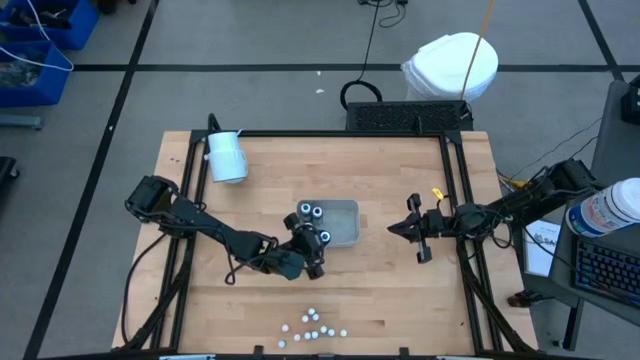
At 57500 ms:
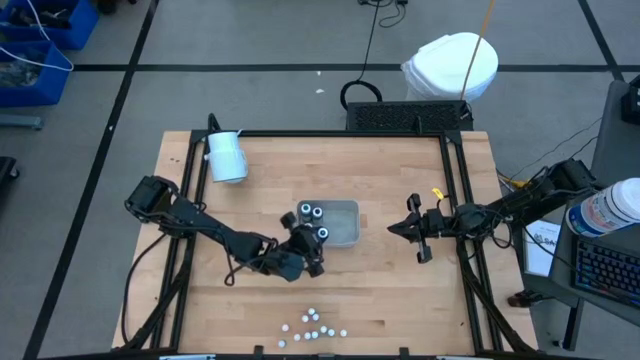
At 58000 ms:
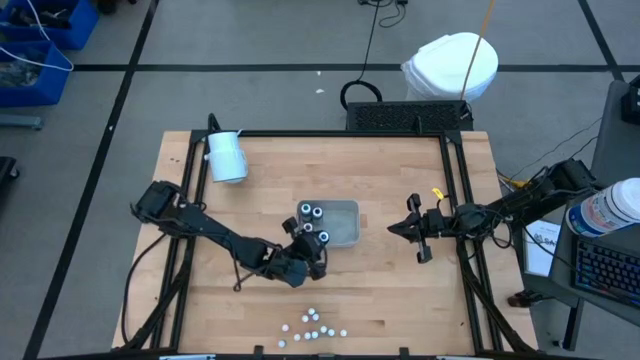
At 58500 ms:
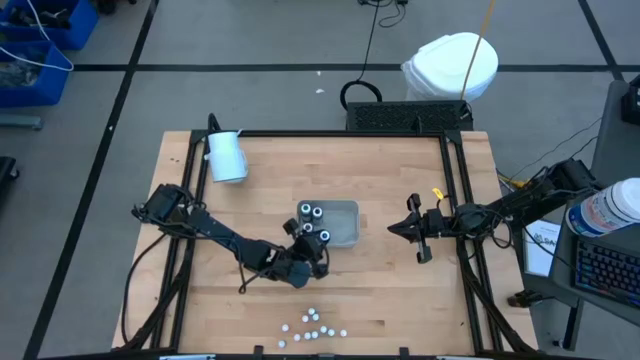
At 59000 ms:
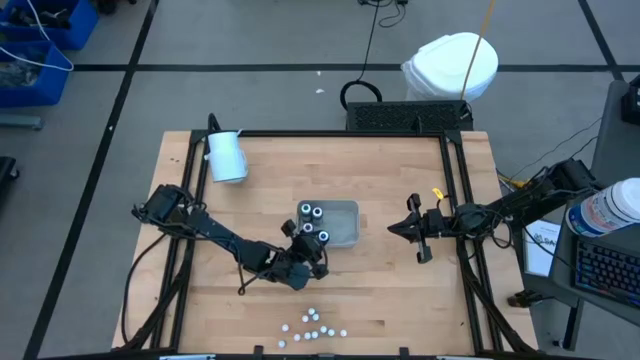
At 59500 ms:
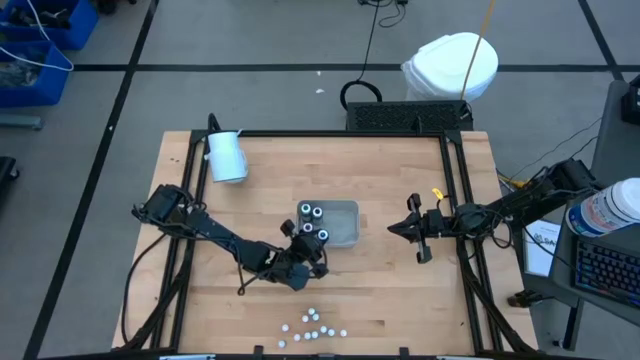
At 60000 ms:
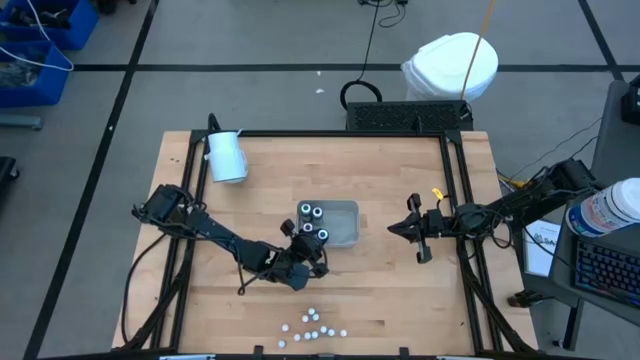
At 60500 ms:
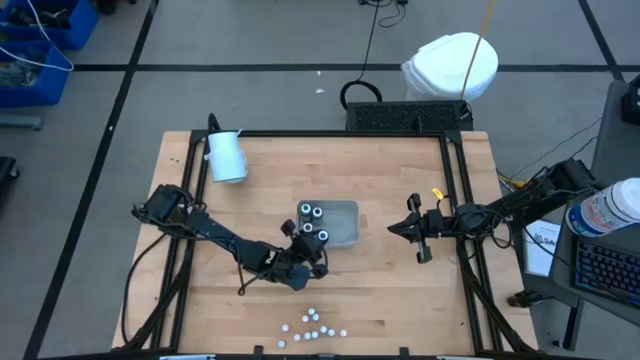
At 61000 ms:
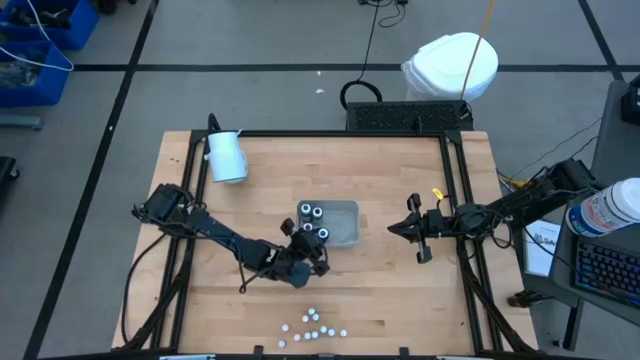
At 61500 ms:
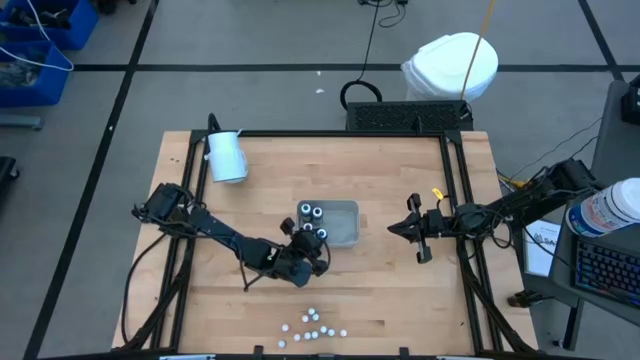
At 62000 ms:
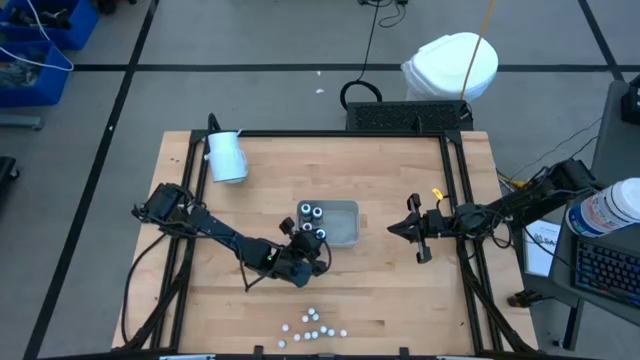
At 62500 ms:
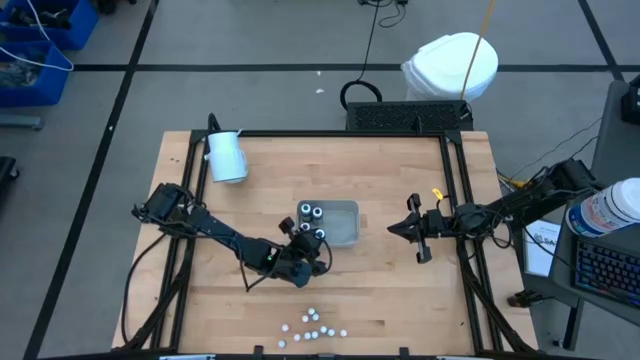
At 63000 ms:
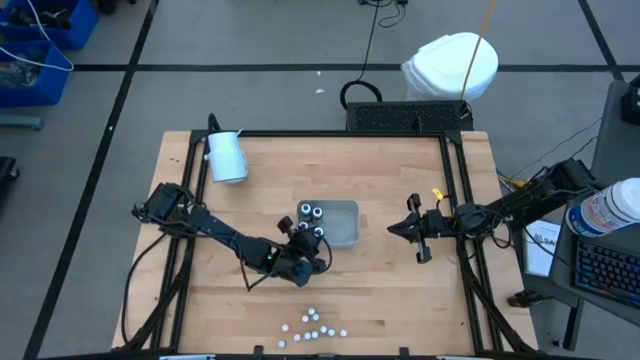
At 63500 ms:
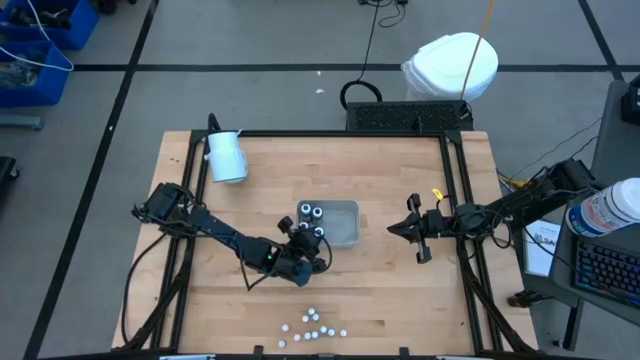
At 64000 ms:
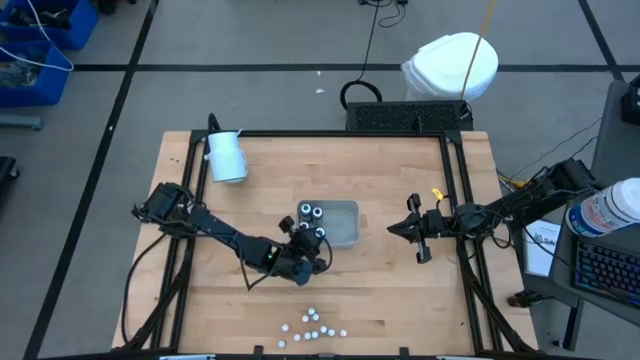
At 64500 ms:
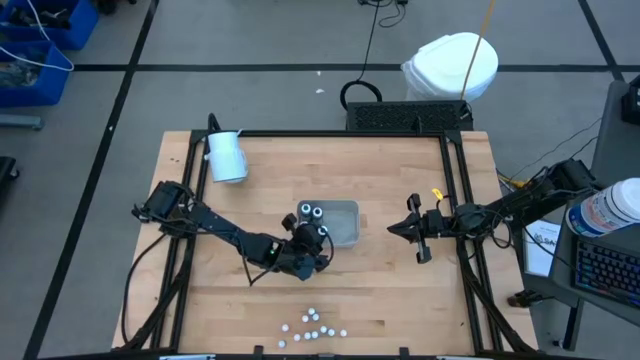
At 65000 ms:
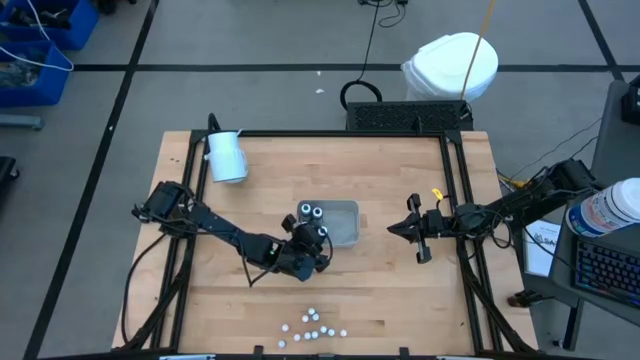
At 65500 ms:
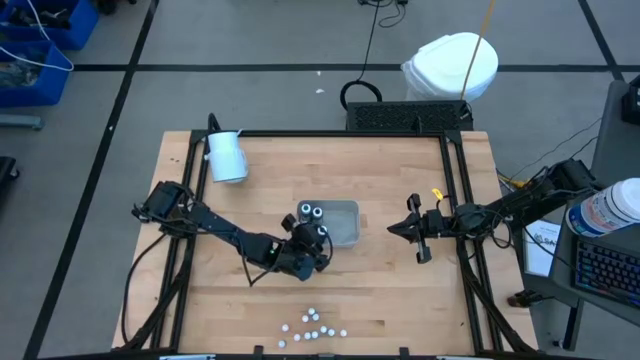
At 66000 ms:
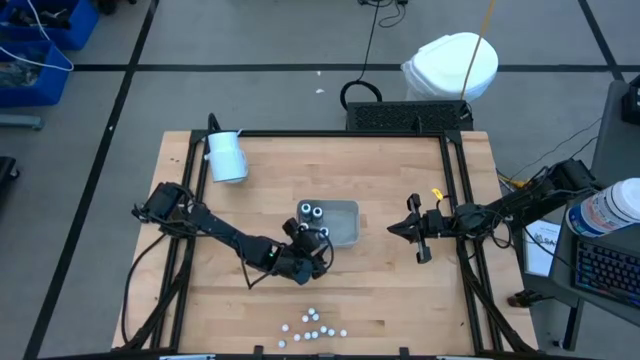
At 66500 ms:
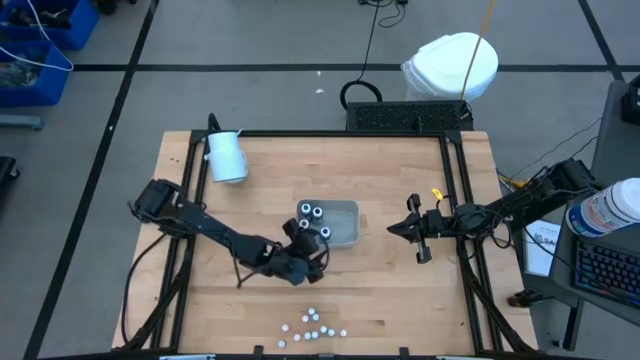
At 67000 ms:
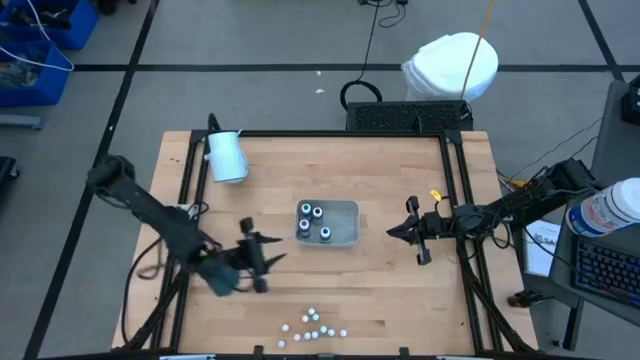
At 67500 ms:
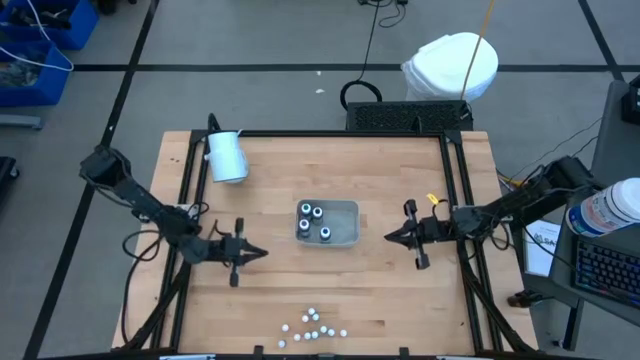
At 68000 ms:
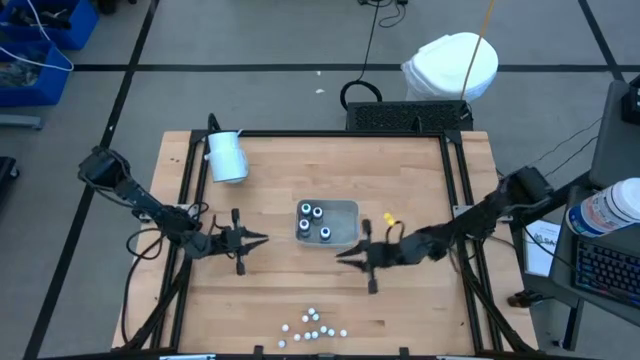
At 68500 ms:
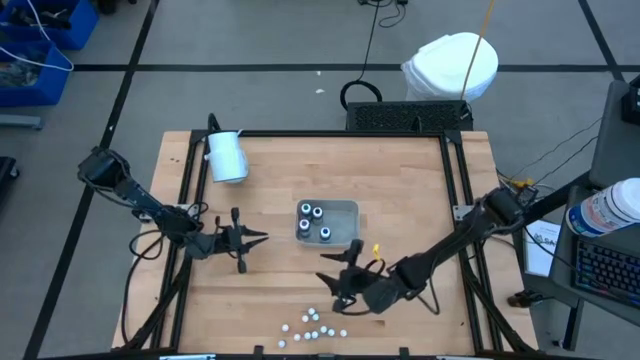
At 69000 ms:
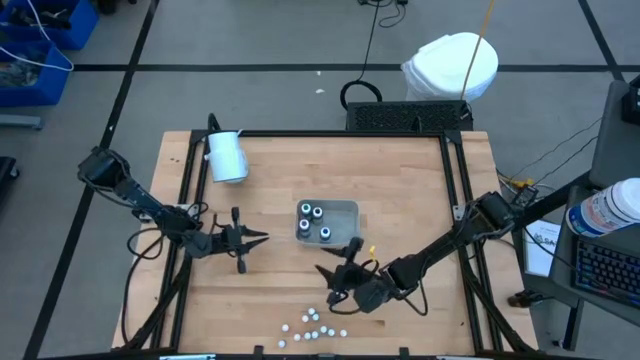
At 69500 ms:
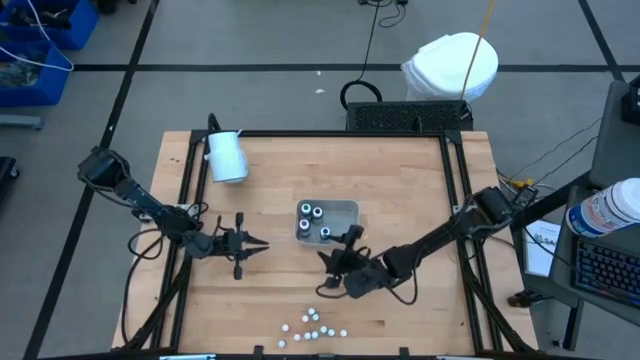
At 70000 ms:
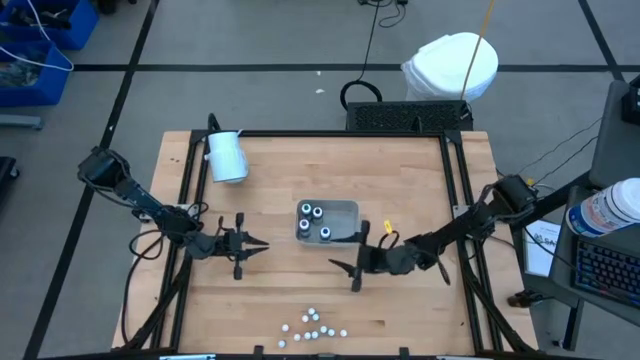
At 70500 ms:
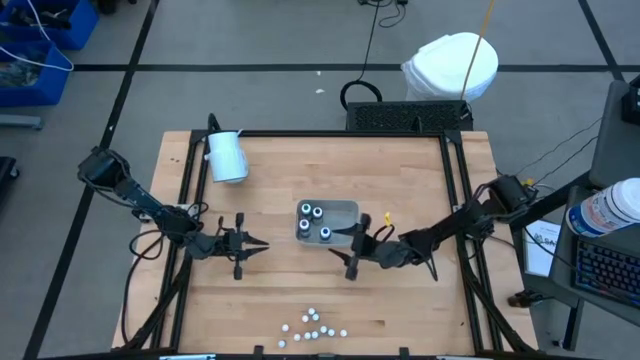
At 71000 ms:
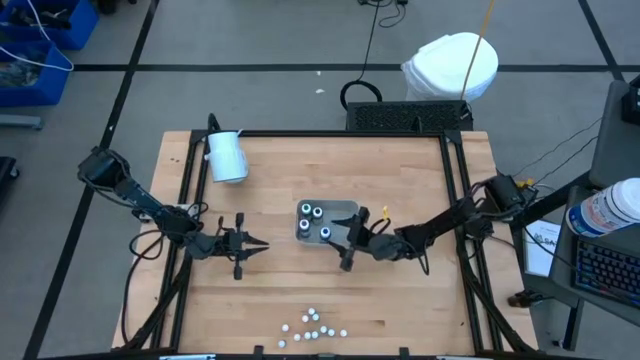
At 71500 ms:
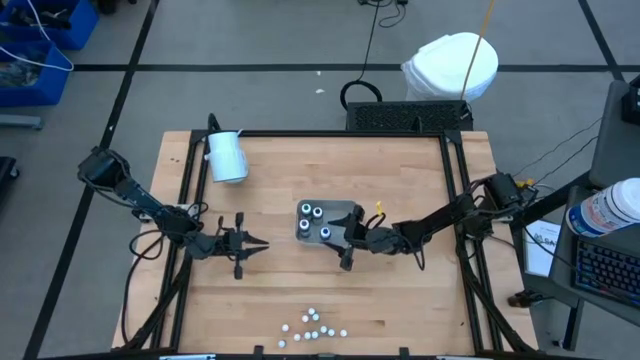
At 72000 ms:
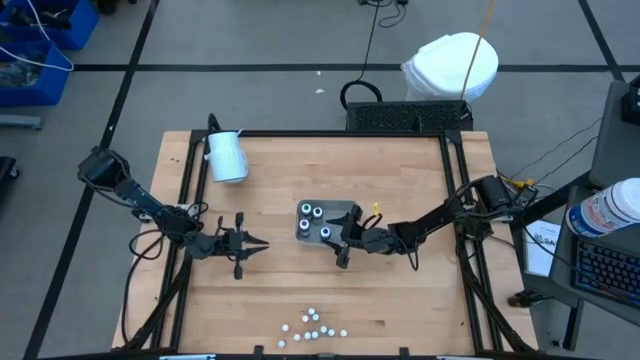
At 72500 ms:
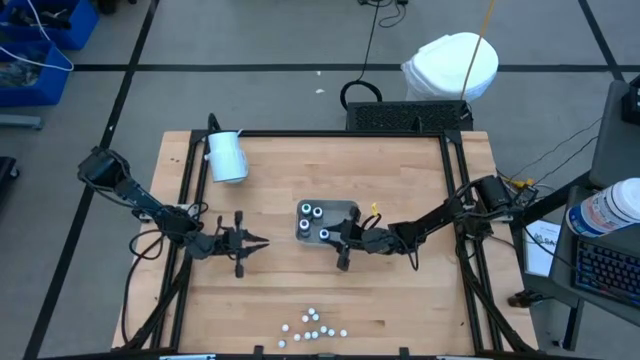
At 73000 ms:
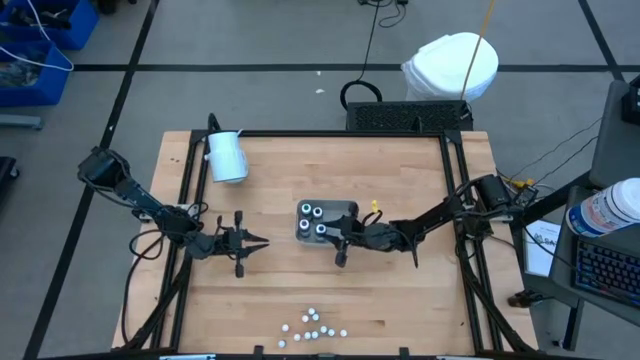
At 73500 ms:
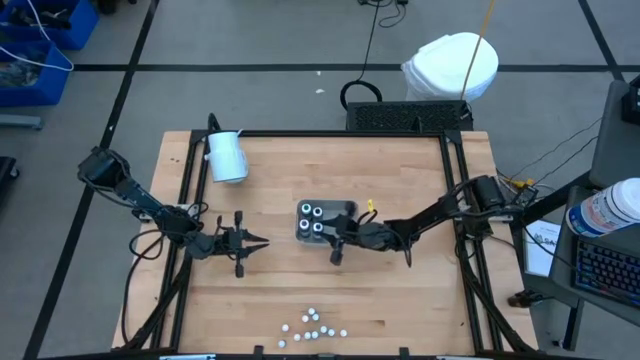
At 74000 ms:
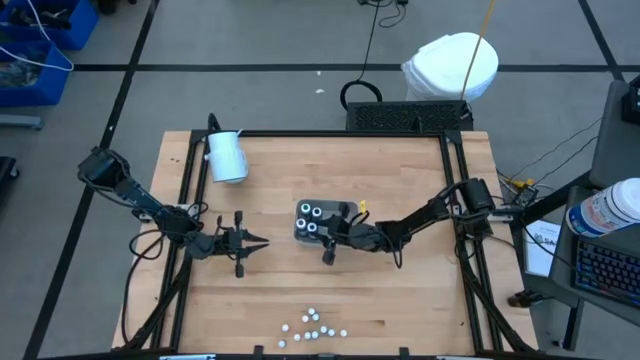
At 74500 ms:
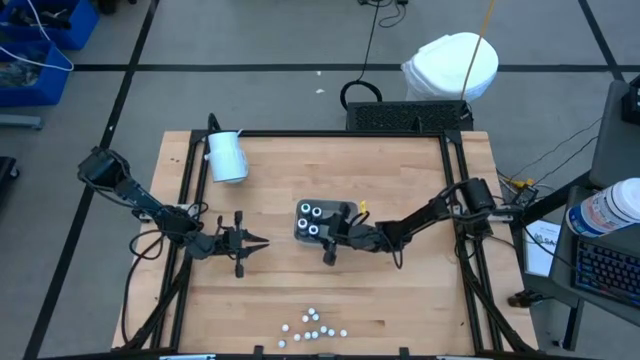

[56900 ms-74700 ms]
Task: Pick & Place food coloring
Put the large blue food coloring bottle into the gray bin
